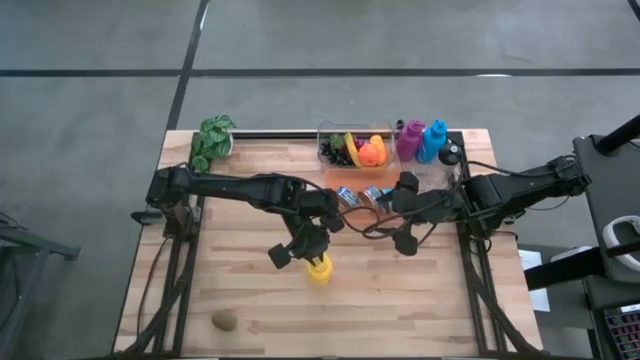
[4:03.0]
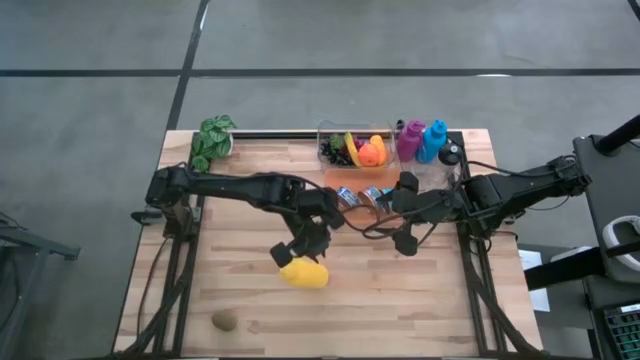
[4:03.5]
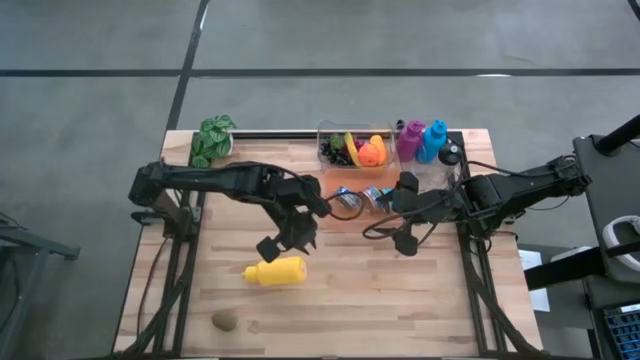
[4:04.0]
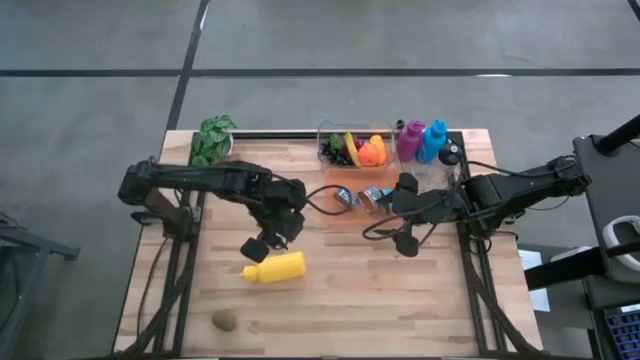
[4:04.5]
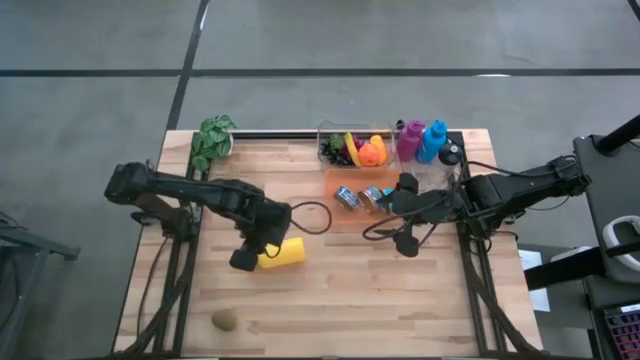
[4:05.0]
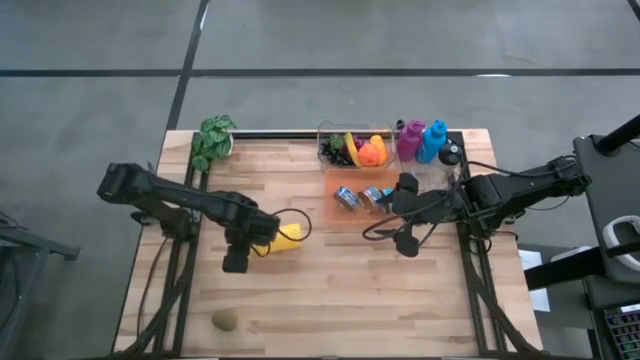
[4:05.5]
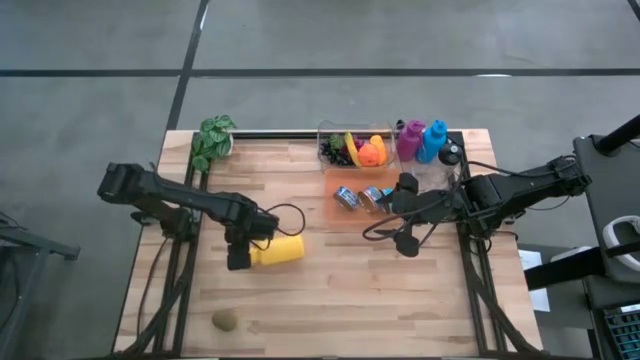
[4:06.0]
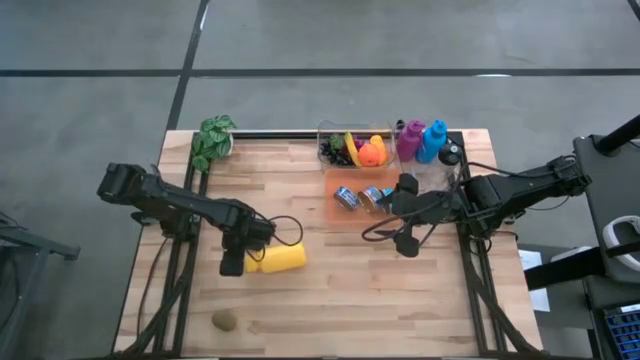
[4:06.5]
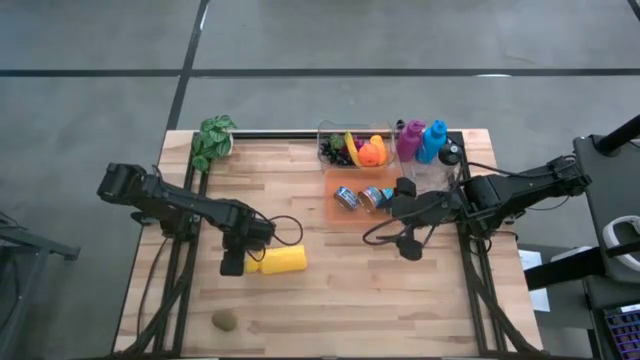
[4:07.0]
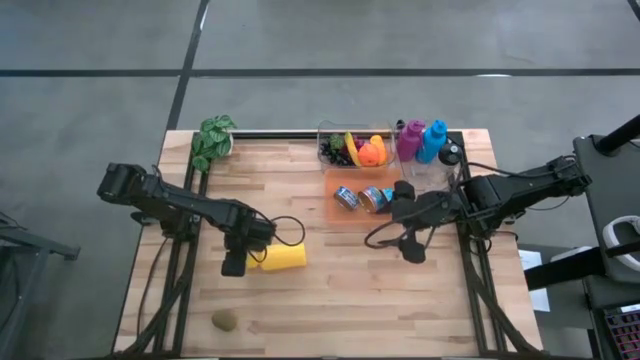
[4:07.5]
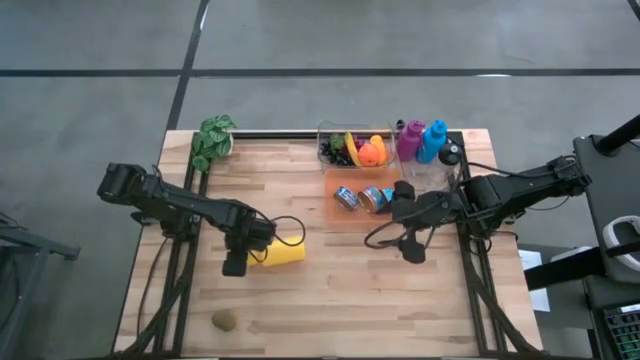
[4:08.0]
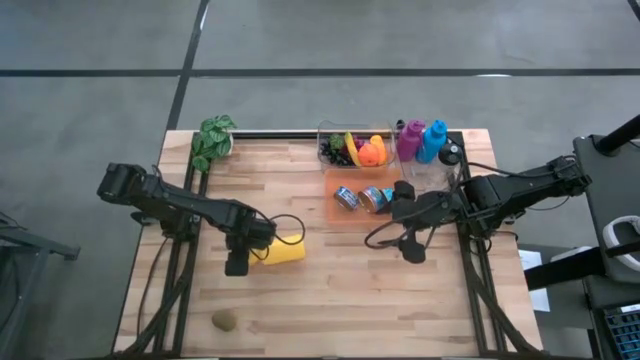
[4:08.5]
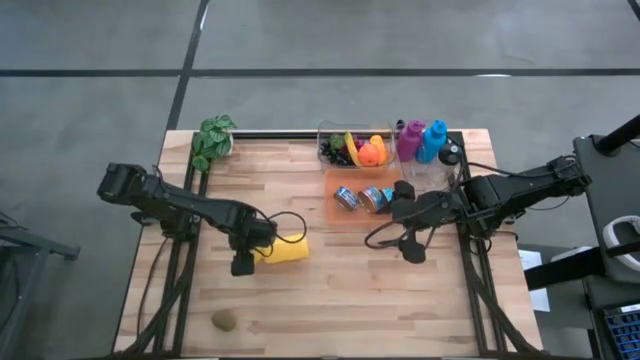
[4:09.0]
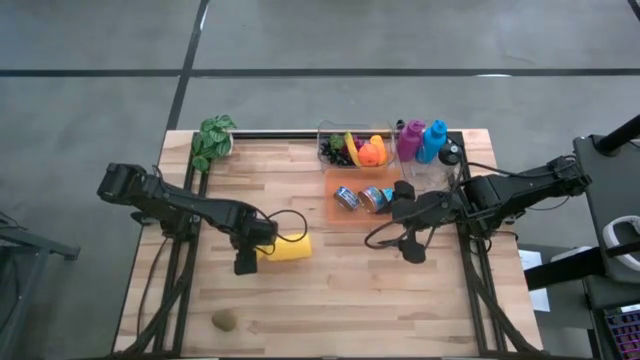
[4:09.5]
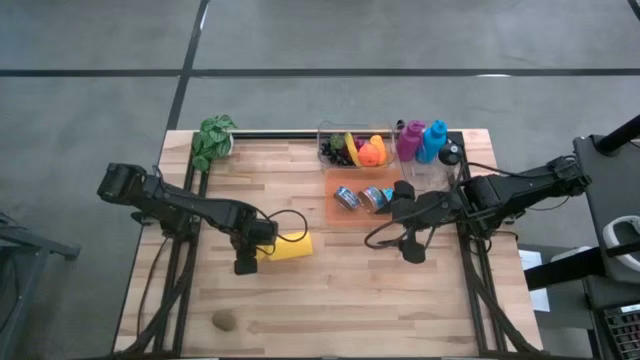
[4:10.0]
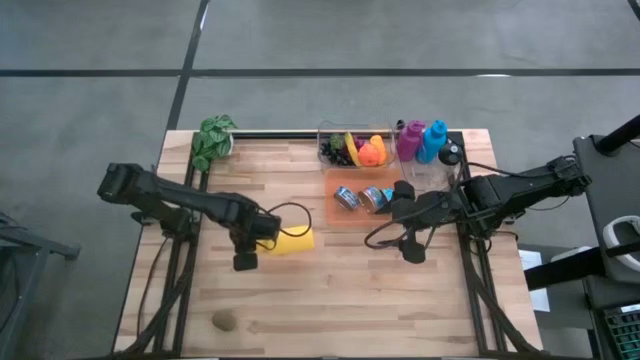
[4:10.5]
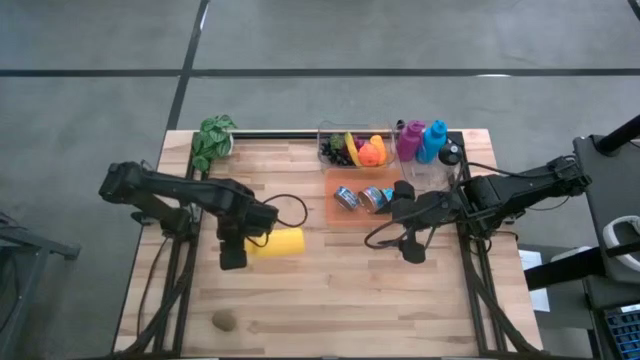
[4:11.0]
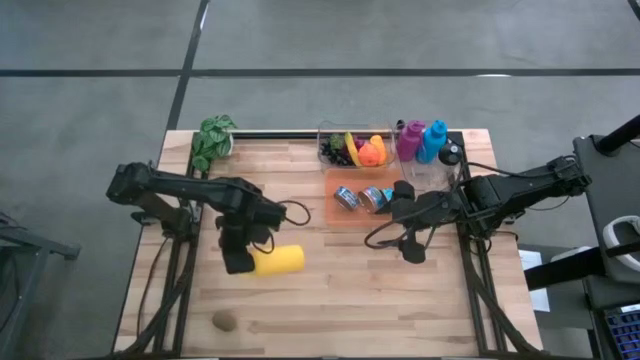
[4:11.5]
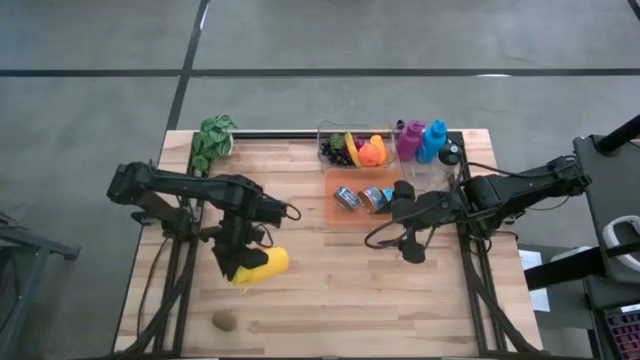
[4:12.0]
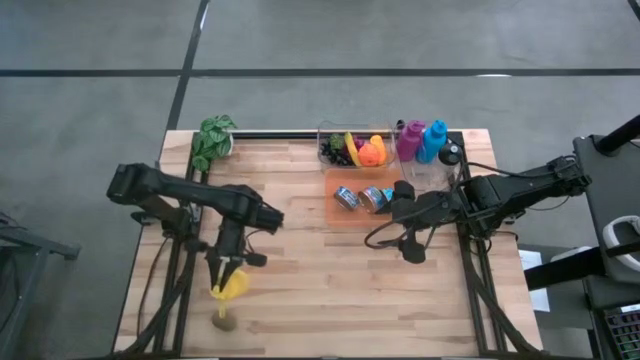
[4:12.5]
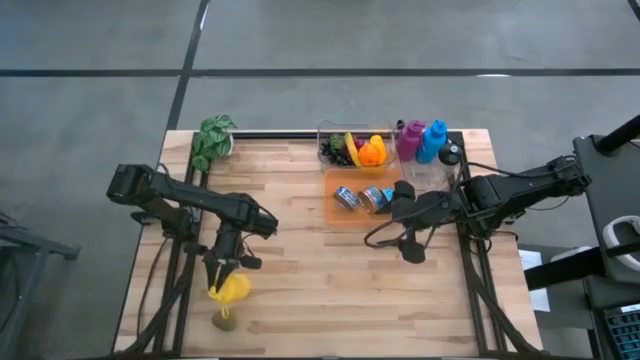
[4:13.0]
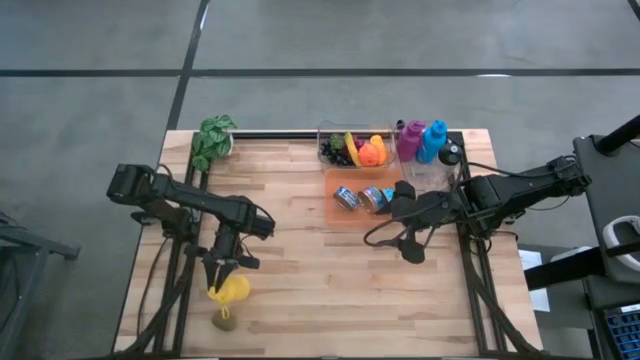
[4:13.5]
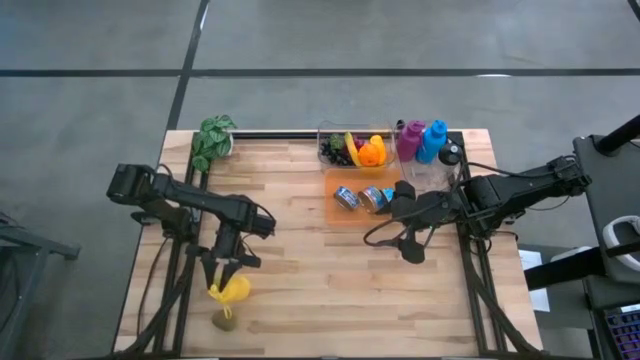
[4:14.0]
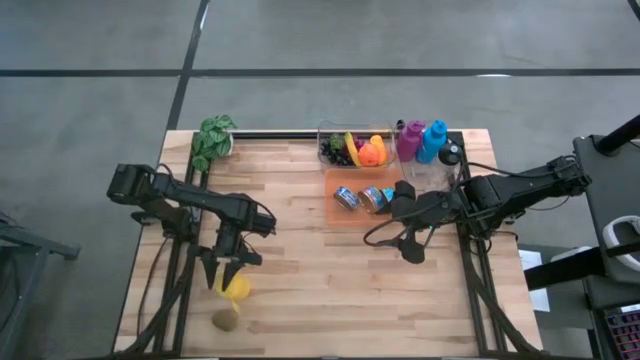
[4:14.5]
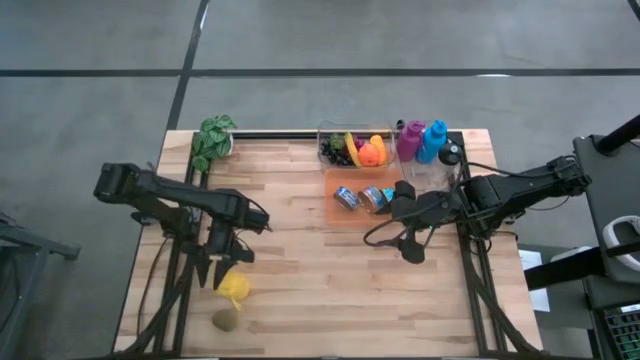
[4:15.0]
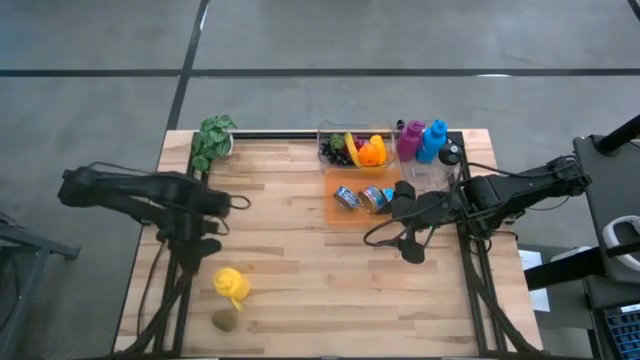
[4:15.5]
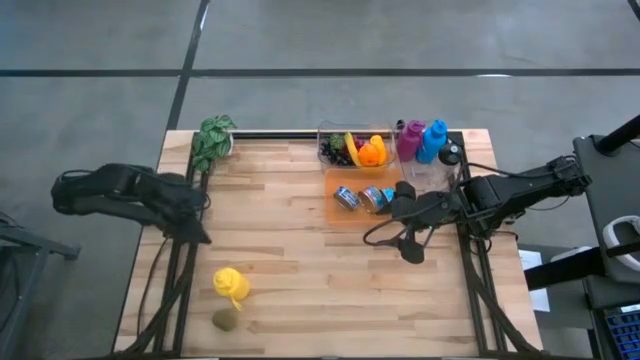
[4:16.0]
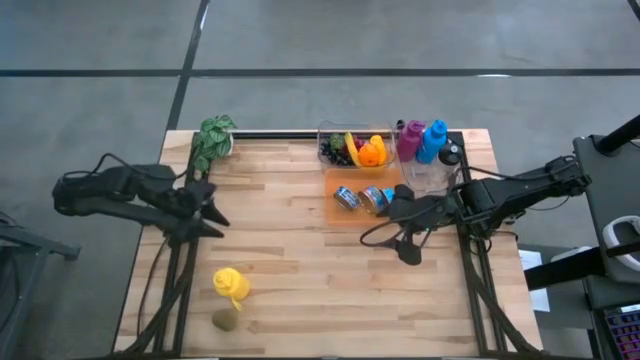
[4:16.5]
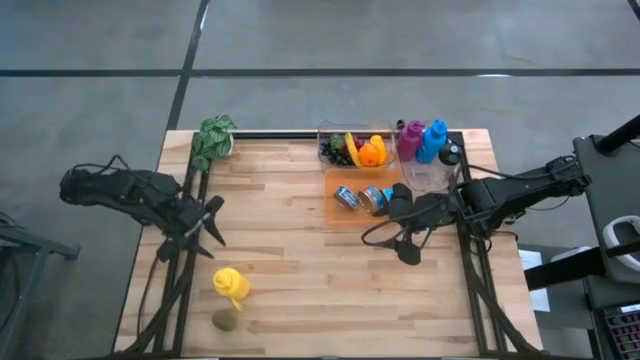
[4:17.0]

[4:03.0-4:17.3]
Task: Pick & Place Food Item
Put the yellow water bottle into the right transparent bin

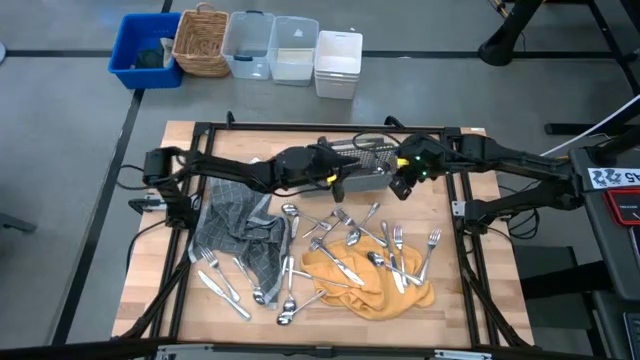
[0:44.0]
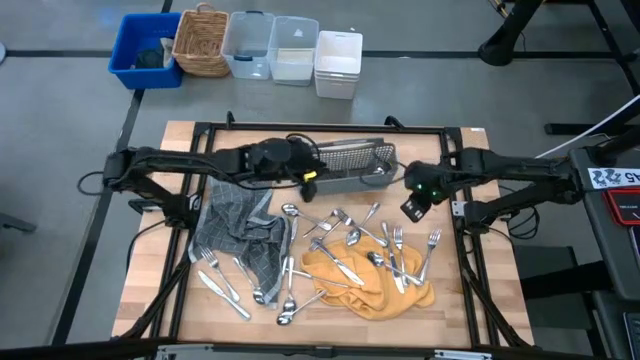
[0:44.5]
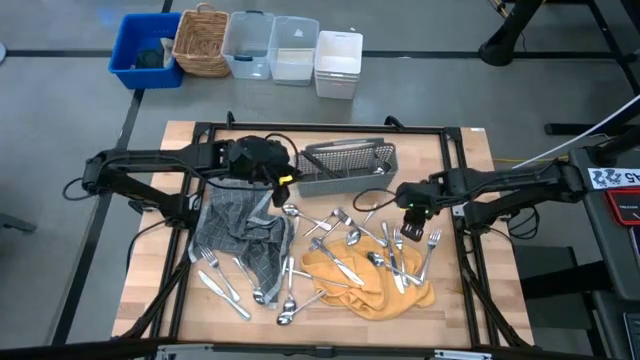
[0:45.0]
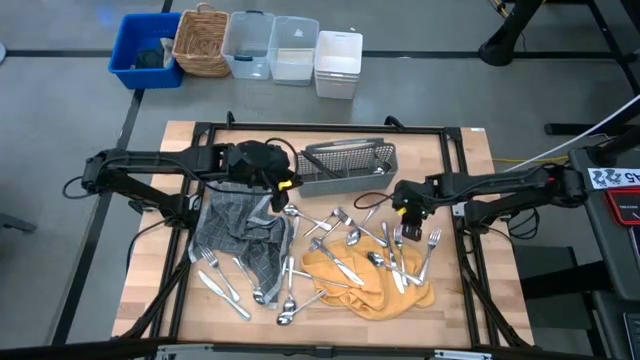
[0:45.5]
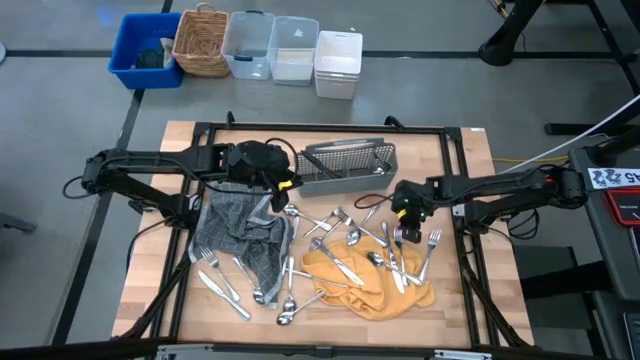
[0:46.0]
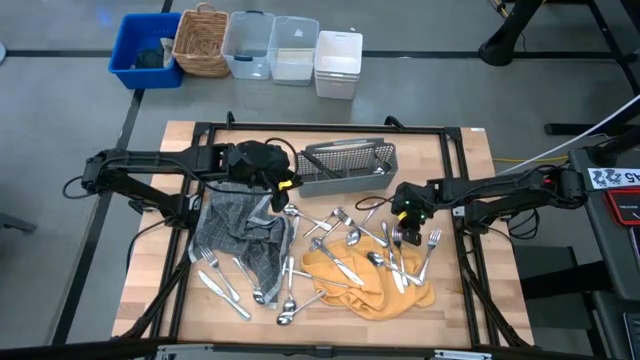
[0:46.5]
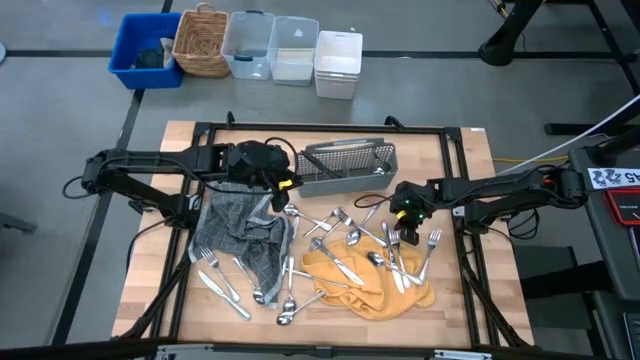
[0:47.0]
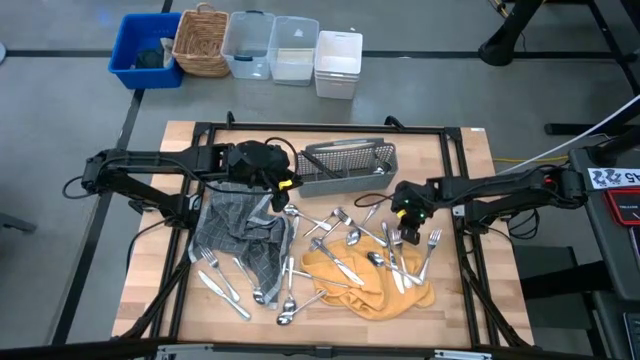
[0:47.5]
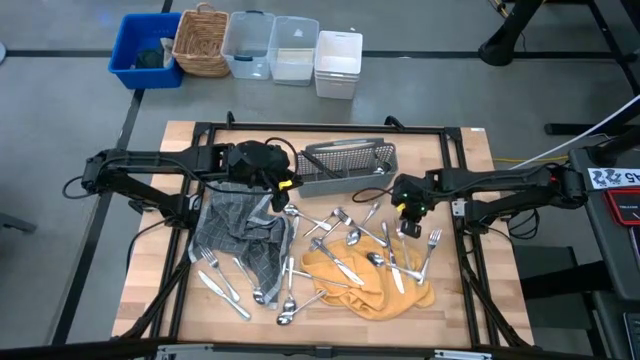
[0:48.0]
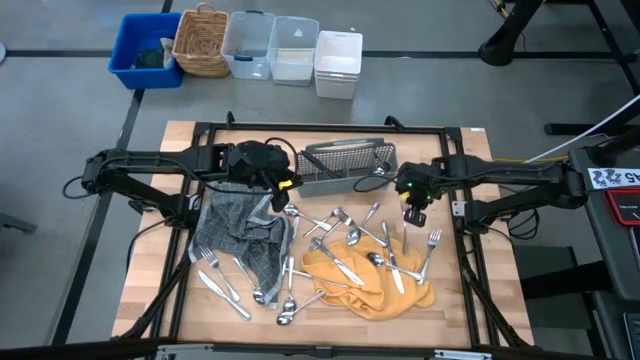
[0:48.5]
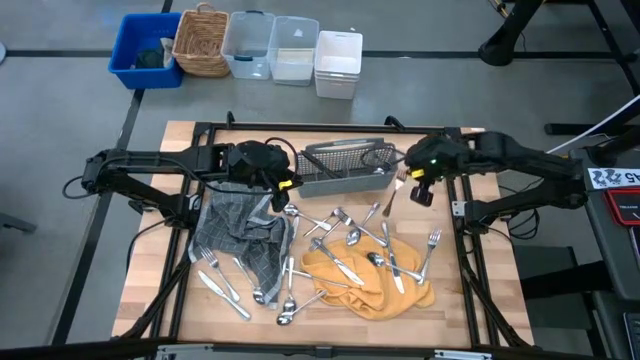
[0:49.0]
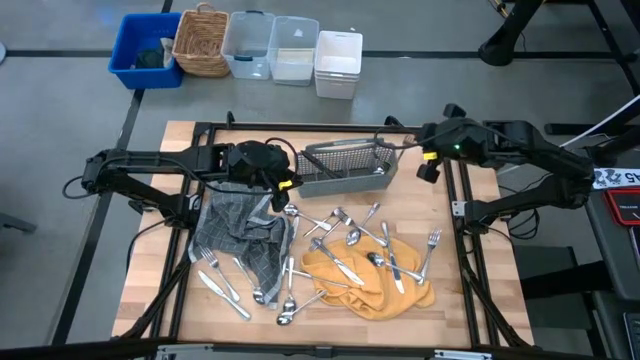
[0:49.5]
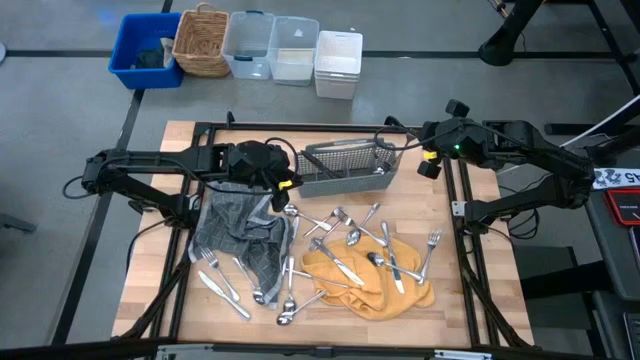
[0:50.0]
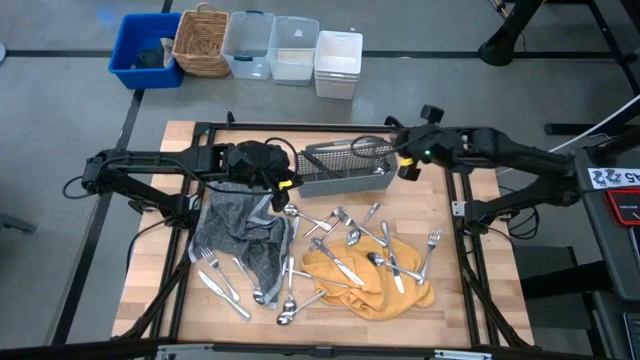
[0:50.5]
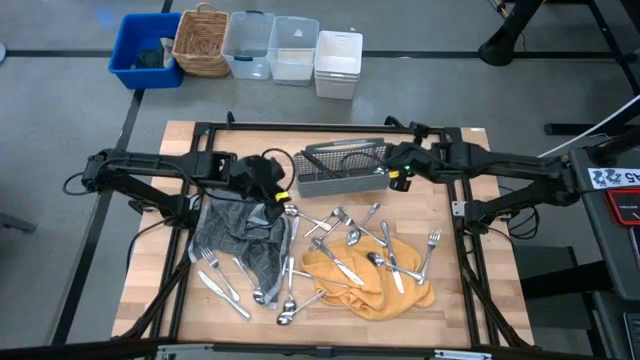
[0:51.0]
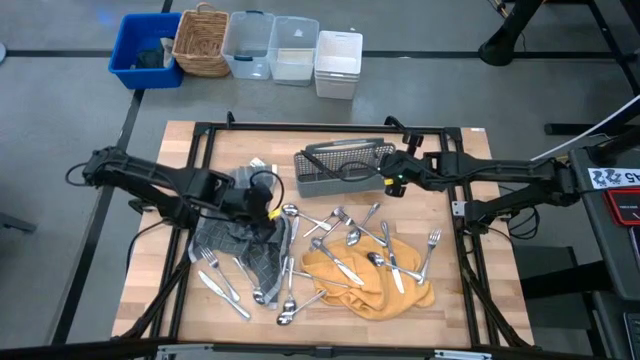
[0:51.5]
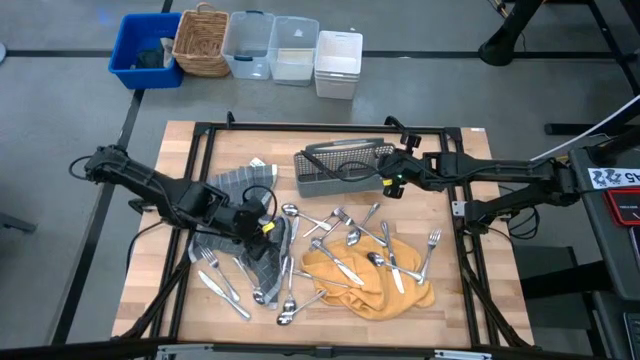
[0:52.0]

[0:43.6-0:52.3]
Task: Sort silverware
Put the silver fork into the gray utensil holder
